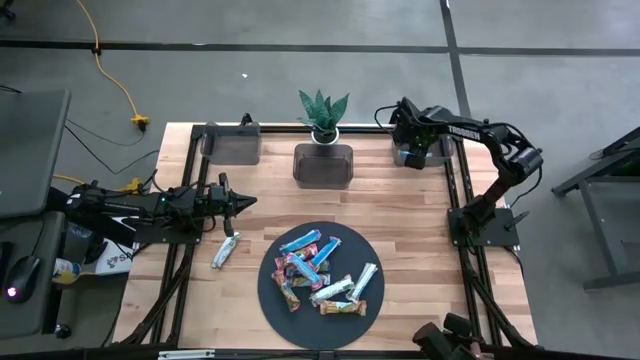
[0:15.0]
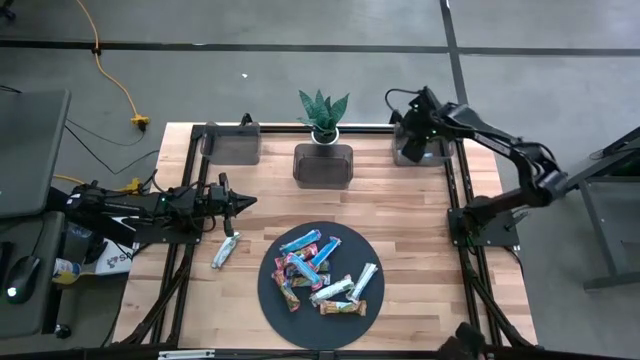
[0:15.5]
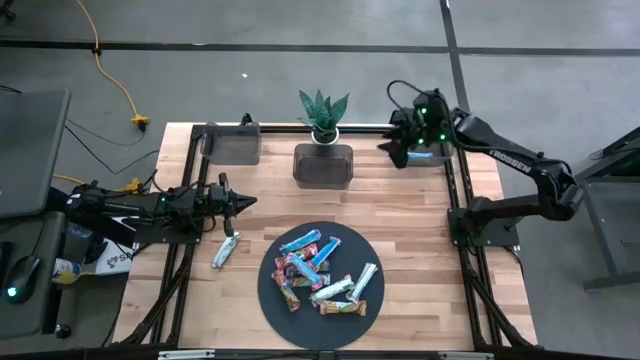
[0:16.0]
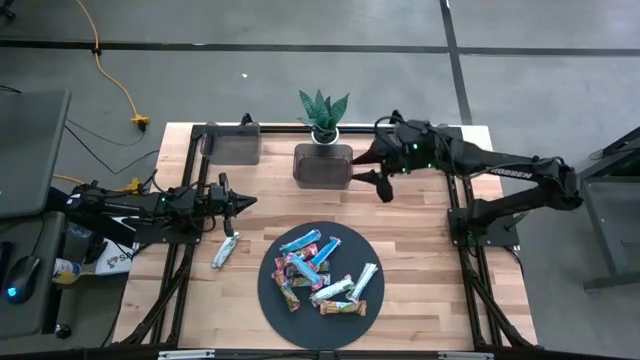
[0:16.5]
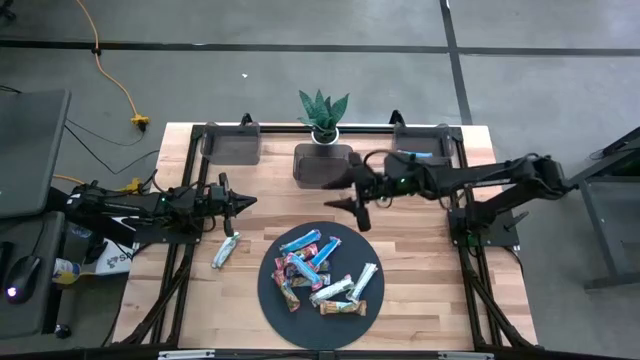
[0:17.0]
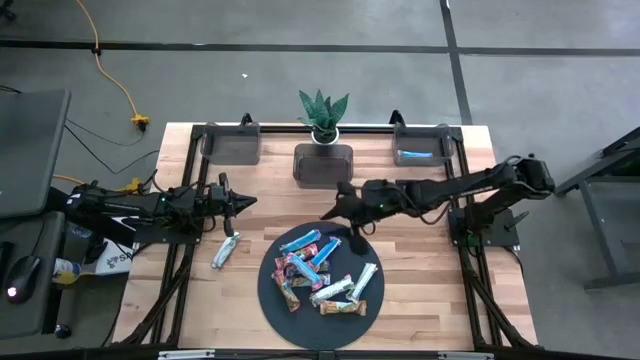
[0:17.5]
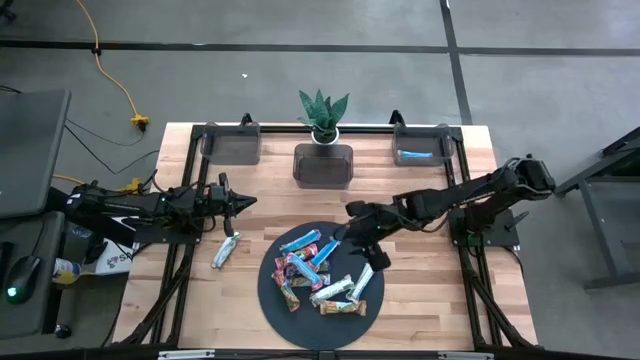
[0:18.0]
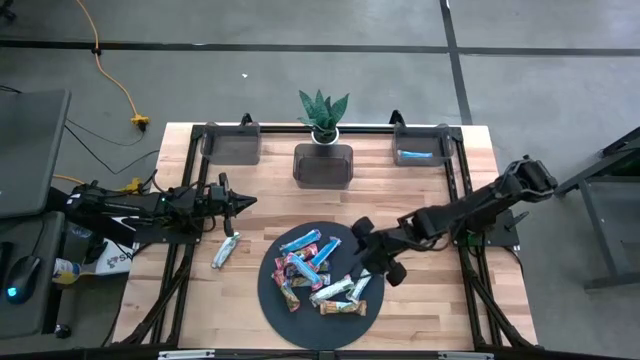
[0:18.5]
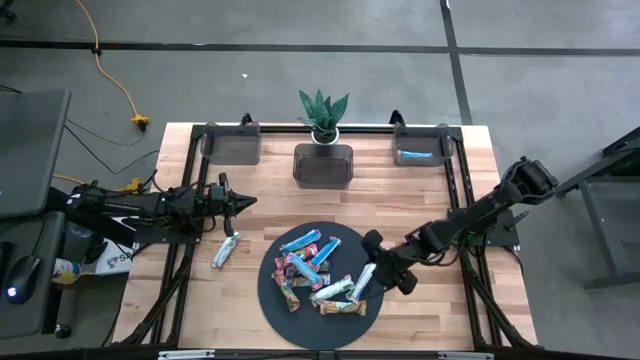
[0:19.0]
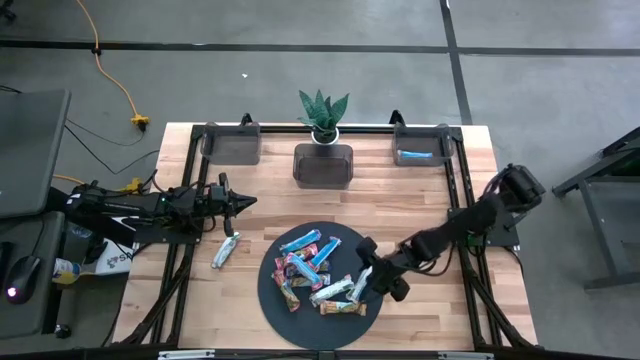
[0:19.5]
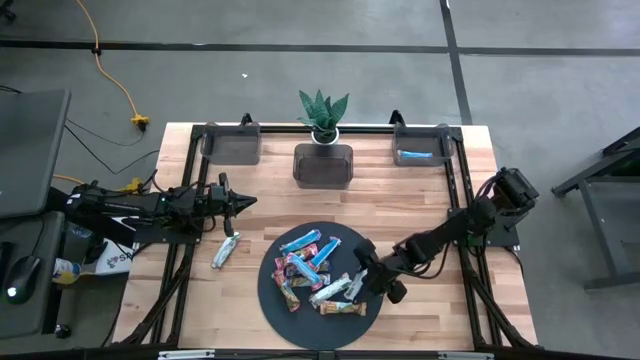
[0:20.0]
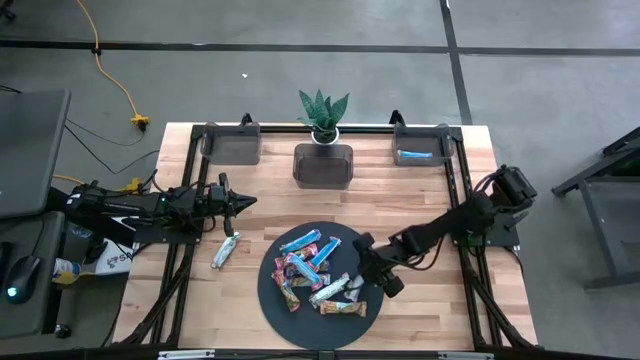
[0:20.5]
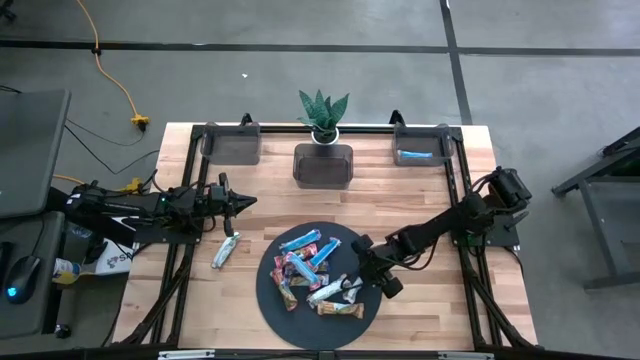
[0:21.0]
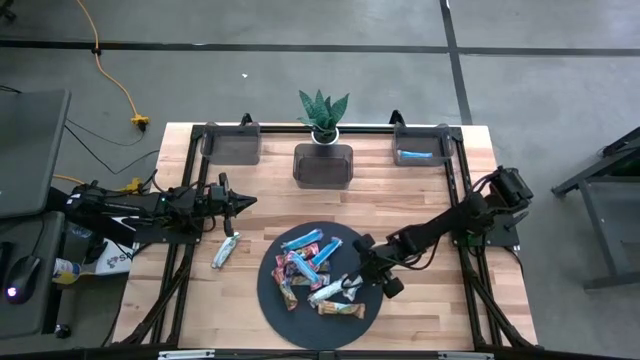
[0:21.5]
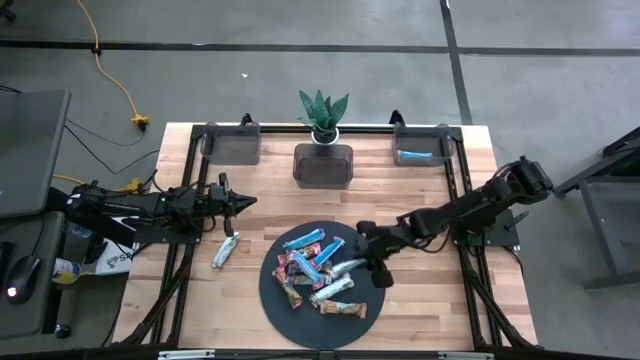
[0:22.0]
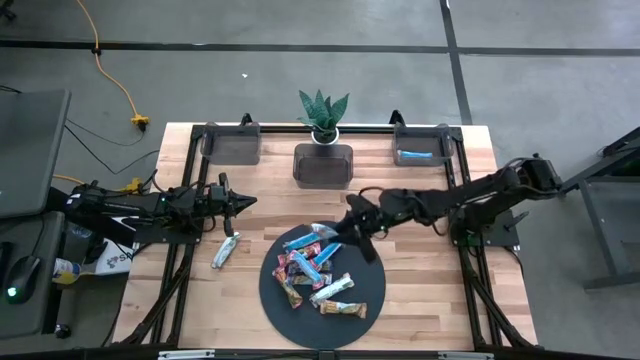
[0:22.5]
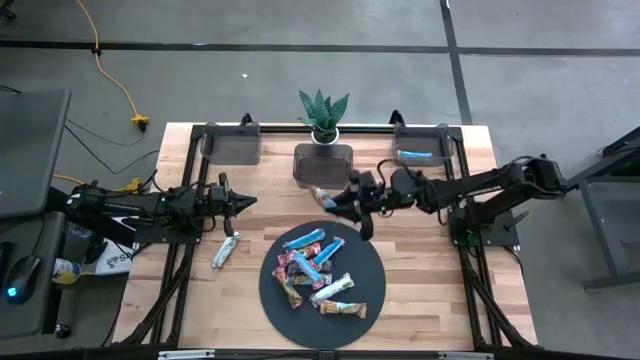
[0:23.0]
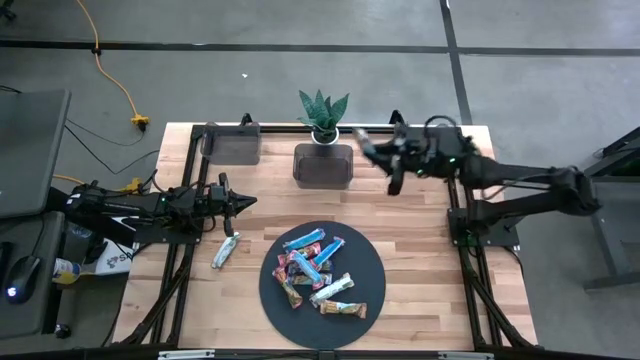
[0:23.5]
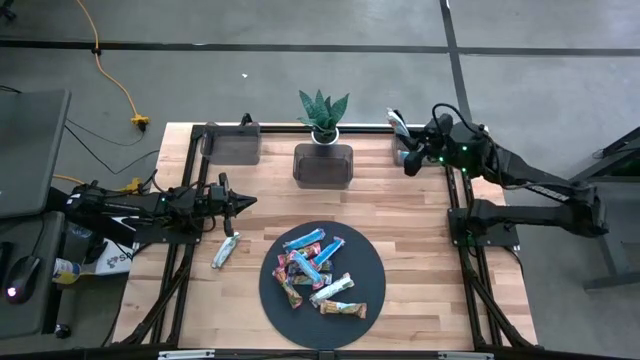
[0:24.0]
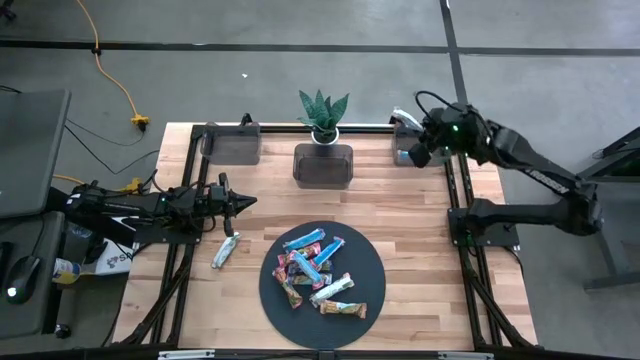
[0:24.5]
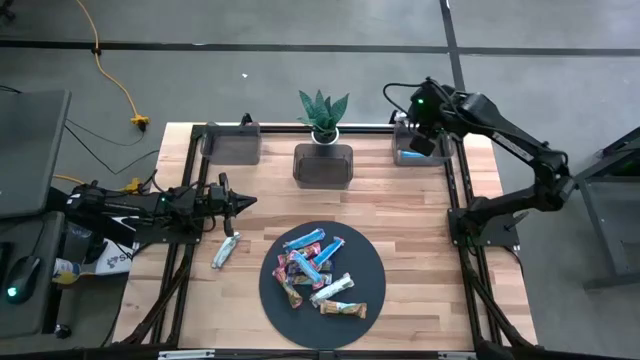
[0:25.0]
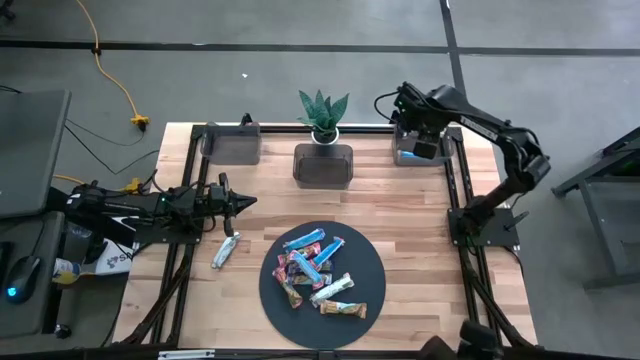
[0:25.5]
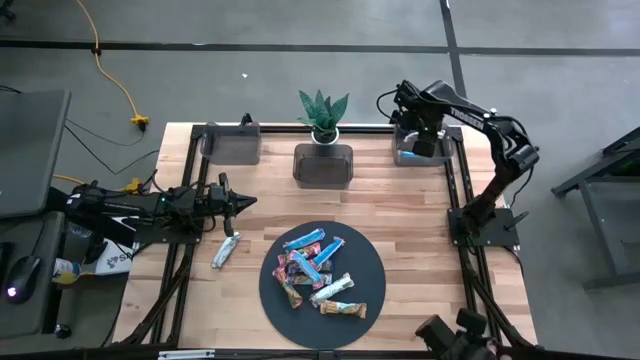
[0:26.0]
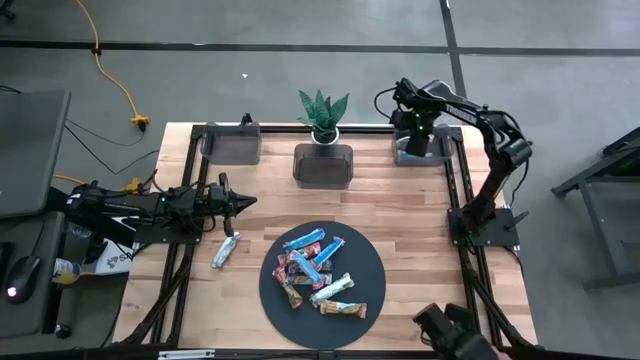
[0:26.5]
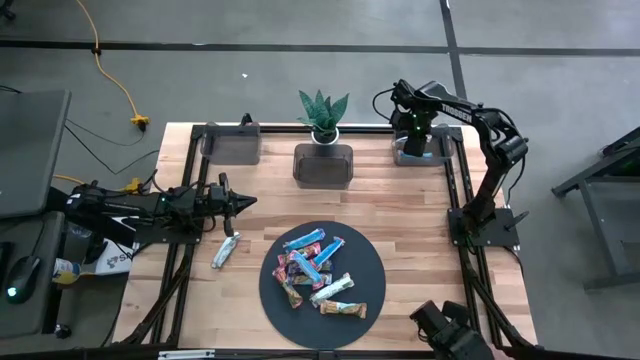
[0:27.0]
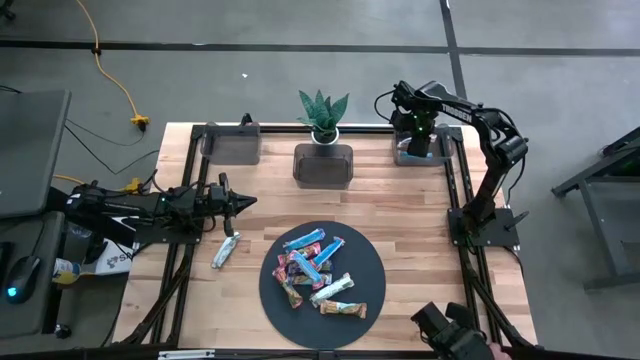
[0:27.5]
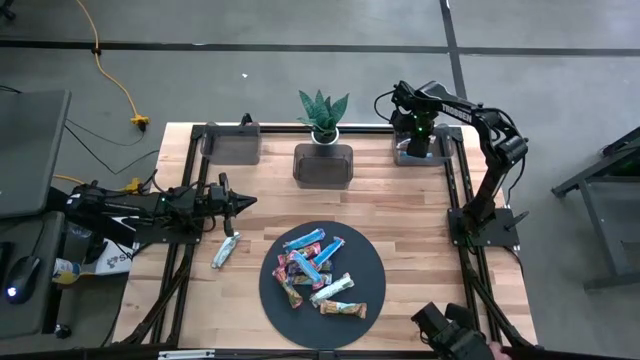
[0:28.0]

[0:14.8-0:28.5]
Task: Pick and place Granola Bars by type
Put the yellow granola bar into the right black bin

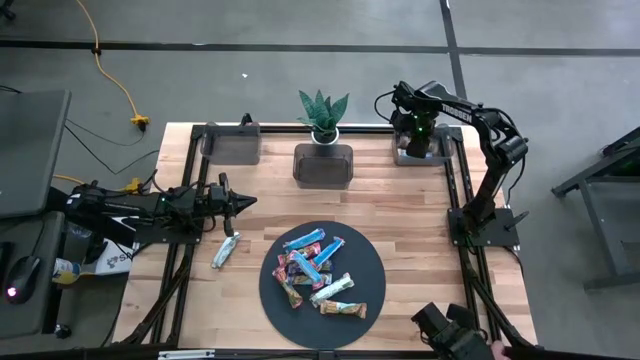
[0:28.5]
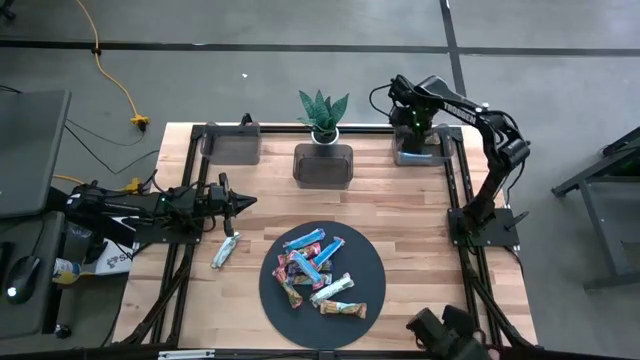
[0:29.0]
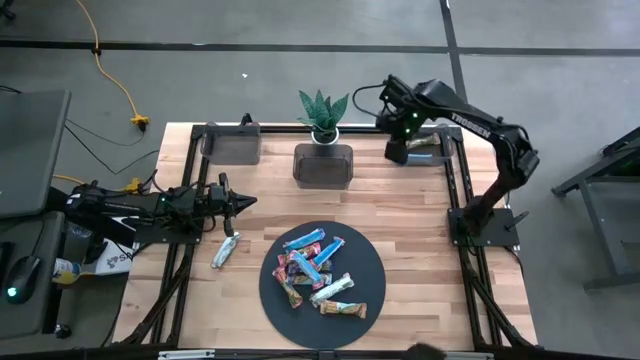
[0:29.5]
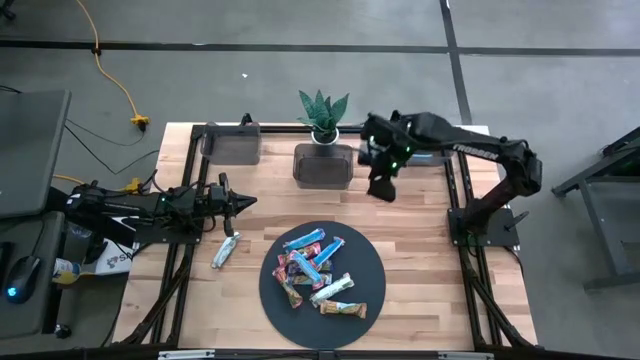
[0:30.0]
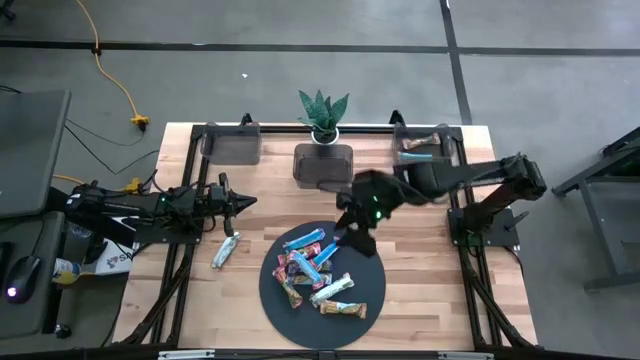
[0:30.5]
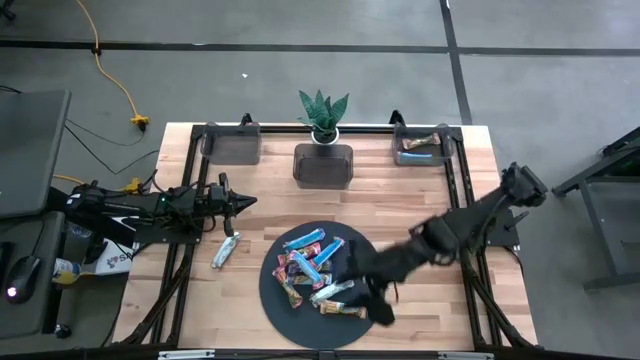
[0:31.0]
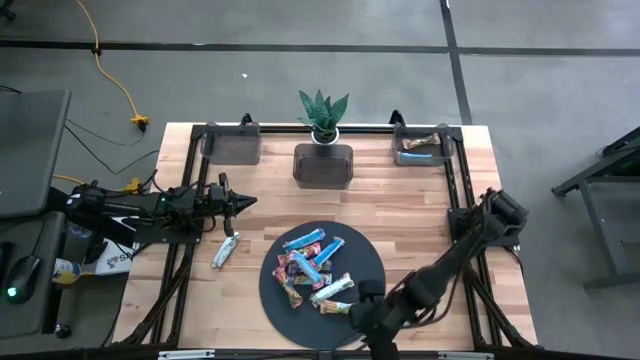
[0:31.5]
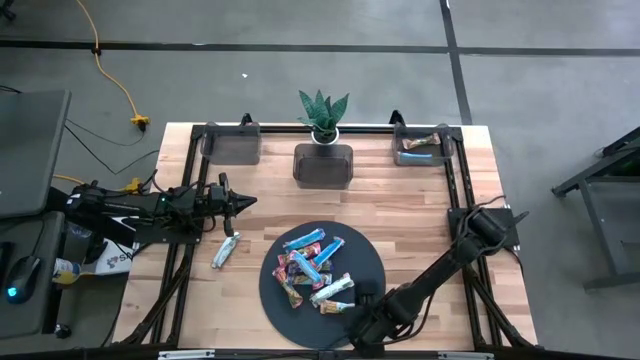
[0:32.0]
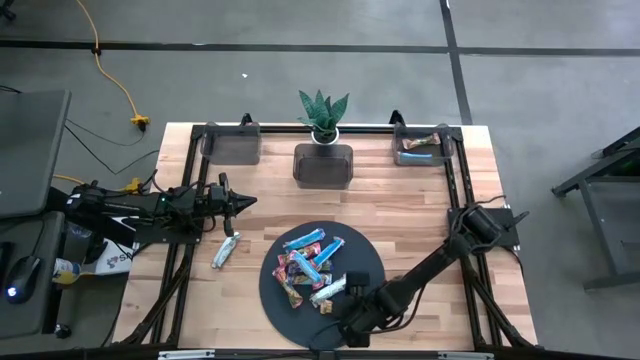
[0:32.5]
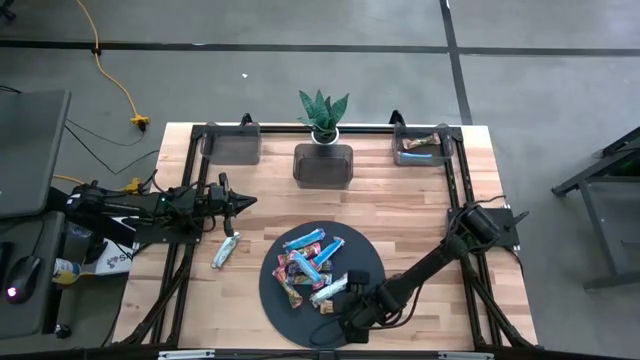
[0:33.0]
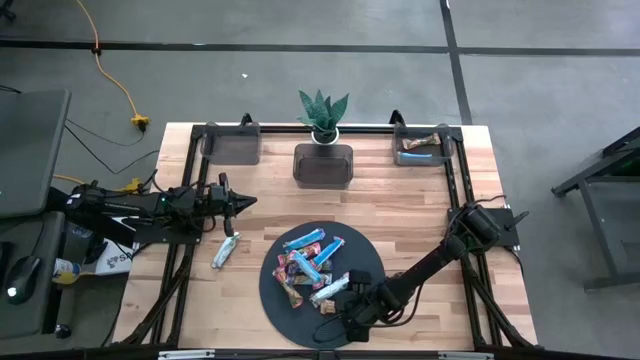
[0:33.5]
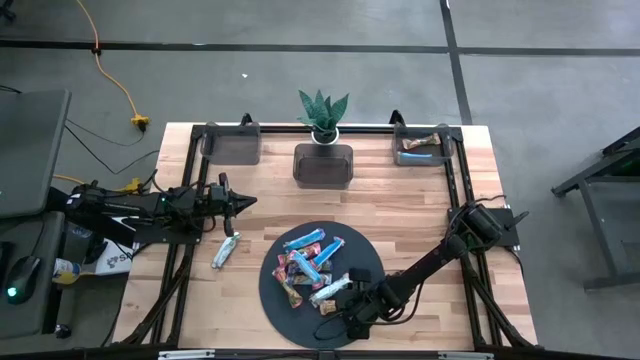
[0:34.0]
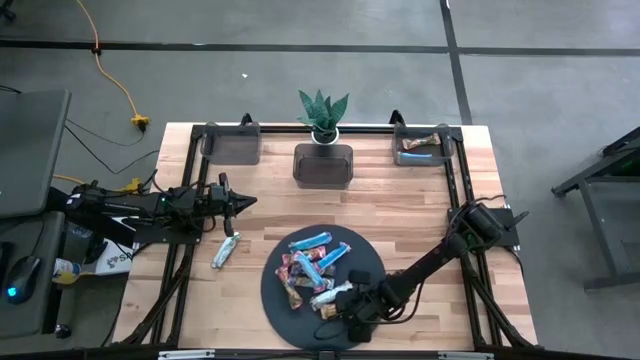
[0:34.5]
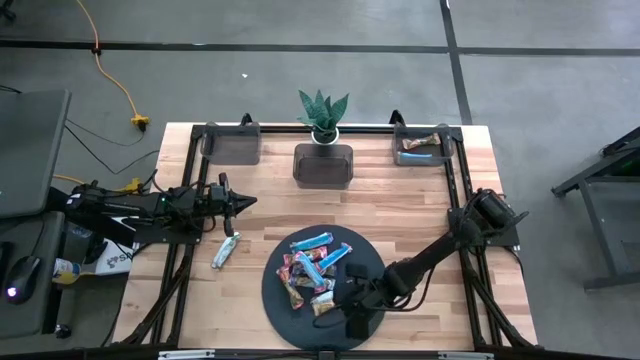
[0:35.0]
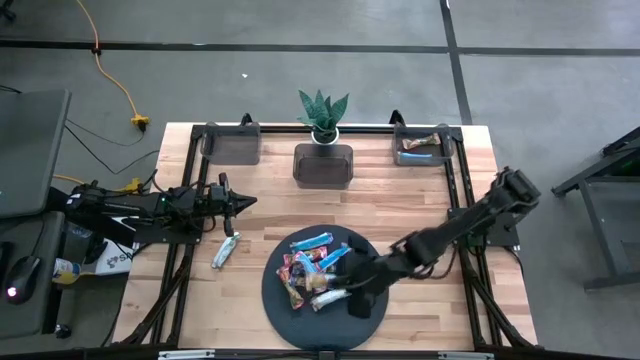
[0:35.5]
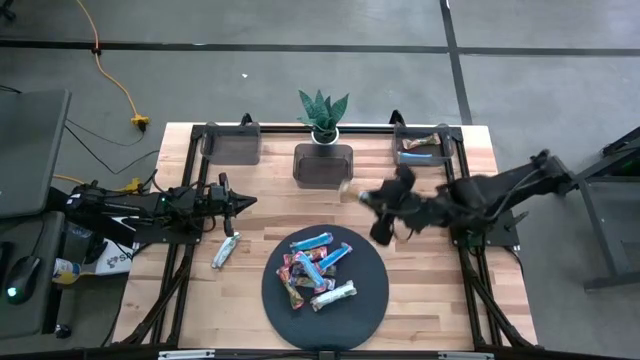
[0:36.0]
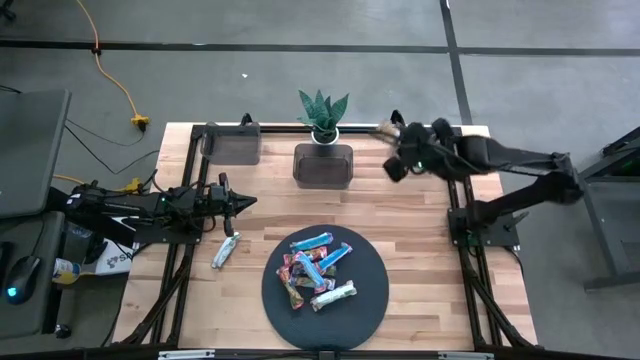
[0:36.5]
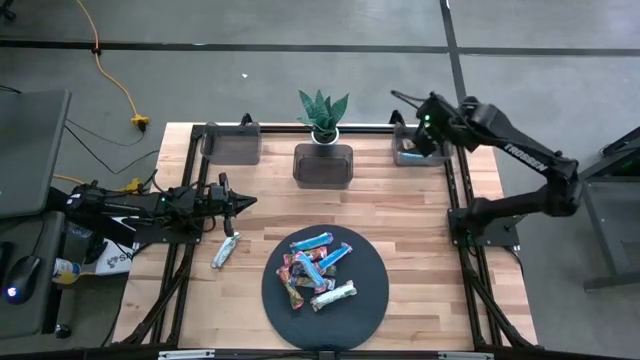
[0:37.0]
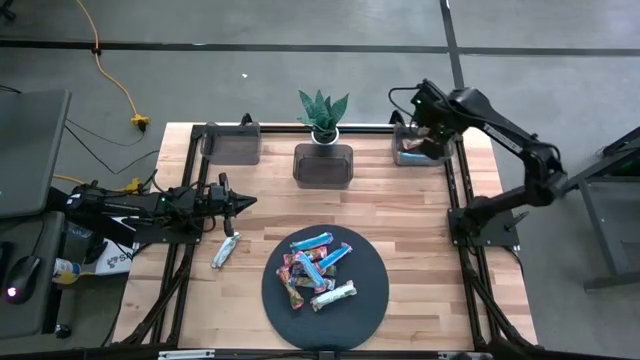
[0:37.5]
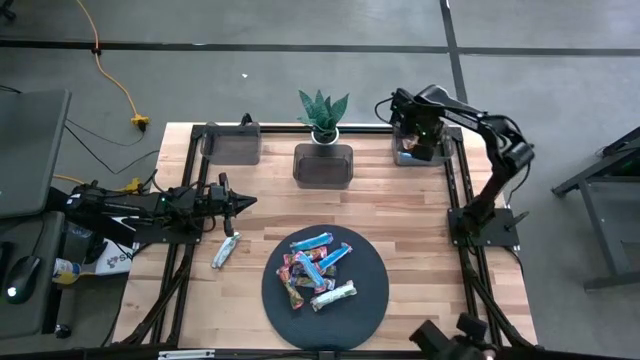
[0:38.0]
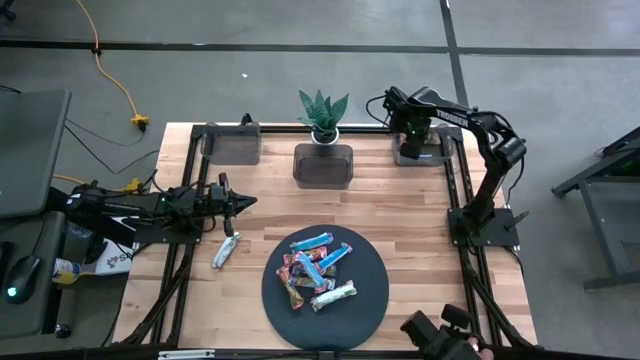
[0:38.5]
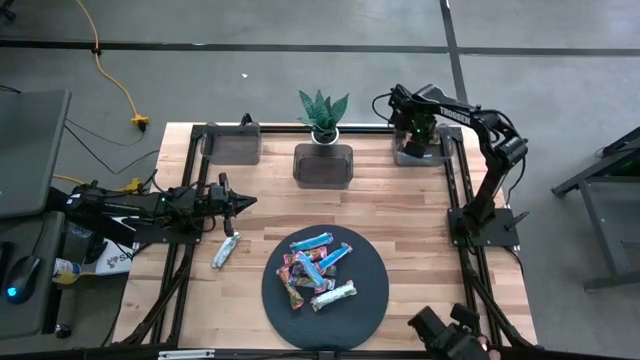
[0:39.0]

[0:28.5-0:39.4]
Put the yellow granola bar into the right black bin
